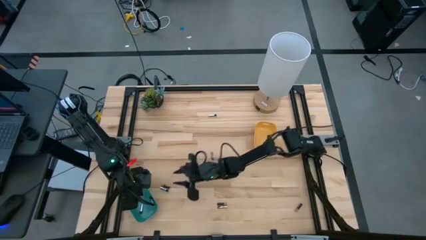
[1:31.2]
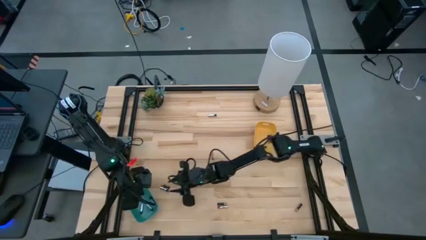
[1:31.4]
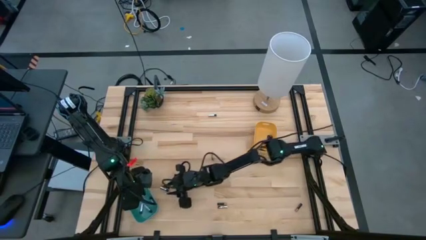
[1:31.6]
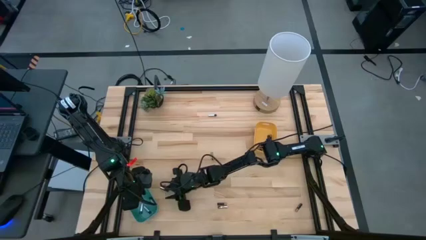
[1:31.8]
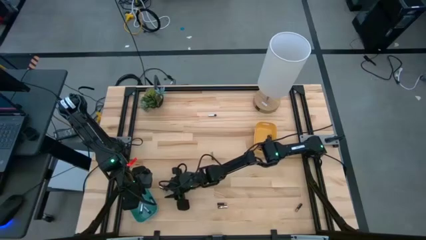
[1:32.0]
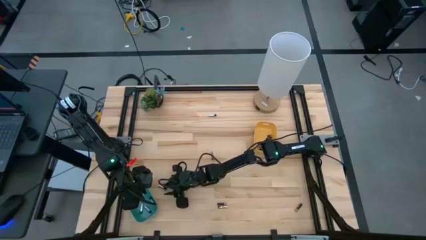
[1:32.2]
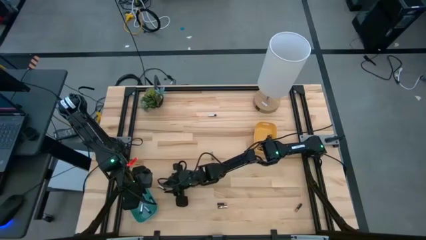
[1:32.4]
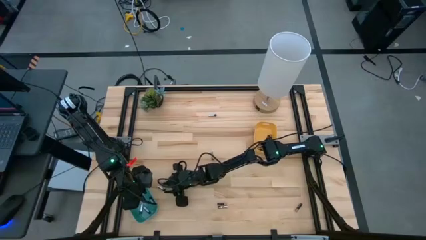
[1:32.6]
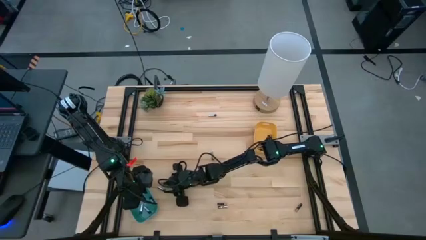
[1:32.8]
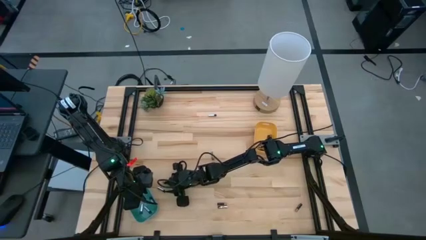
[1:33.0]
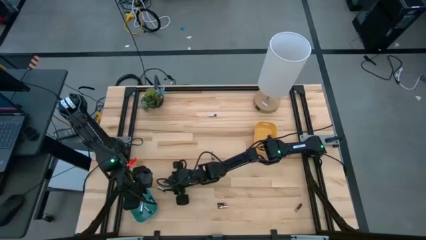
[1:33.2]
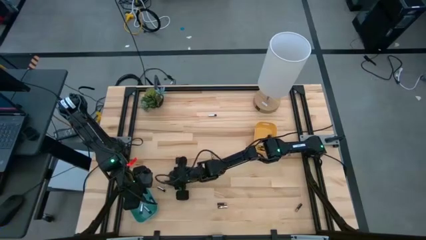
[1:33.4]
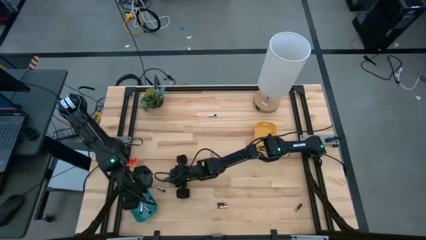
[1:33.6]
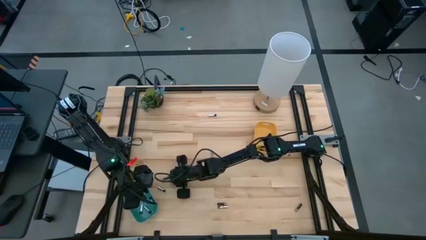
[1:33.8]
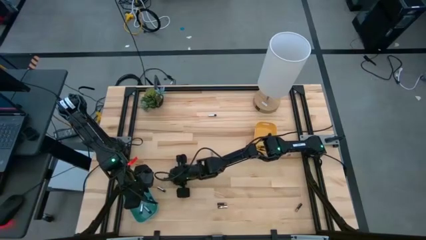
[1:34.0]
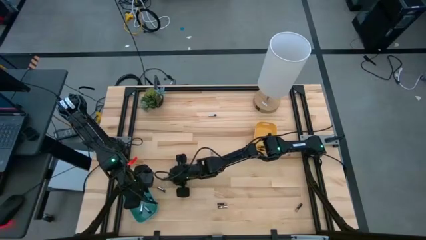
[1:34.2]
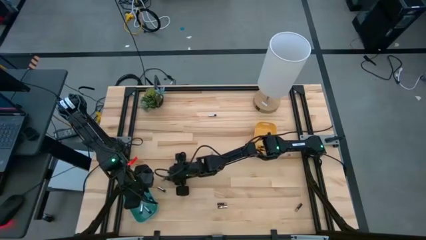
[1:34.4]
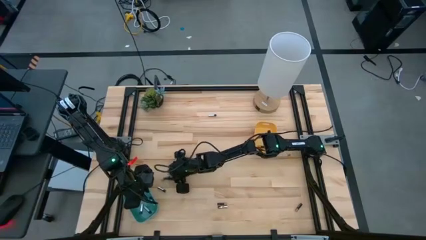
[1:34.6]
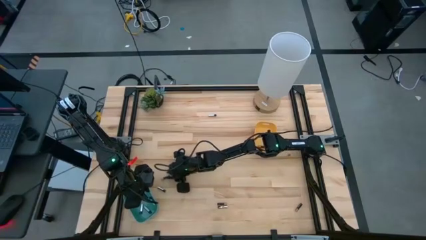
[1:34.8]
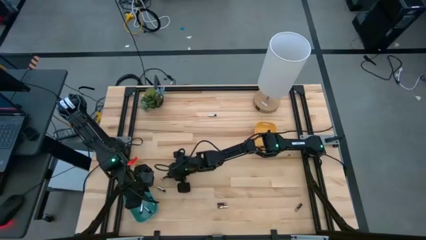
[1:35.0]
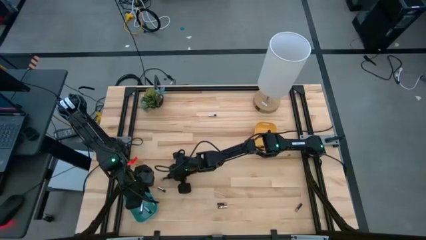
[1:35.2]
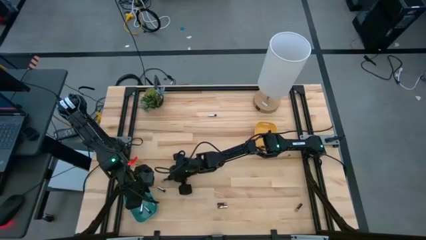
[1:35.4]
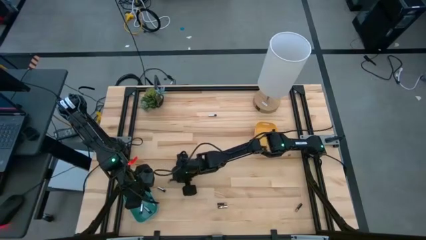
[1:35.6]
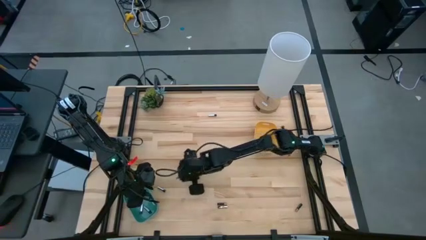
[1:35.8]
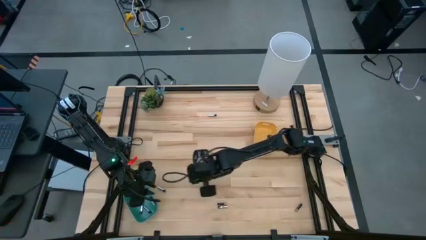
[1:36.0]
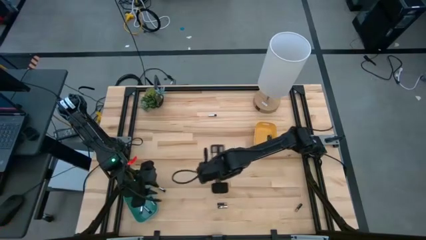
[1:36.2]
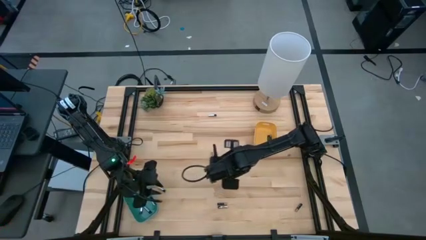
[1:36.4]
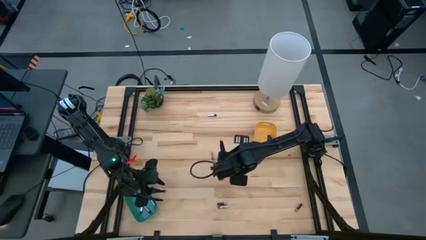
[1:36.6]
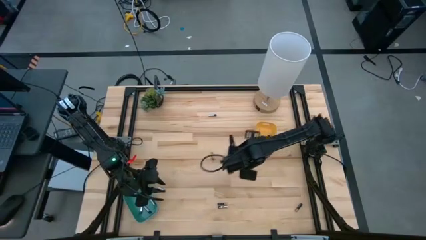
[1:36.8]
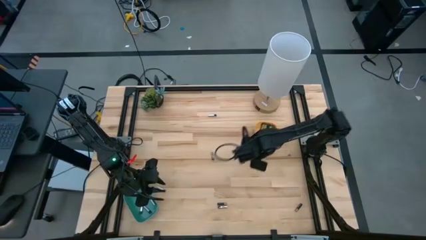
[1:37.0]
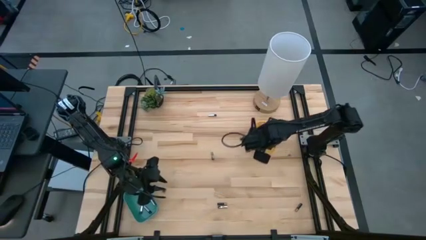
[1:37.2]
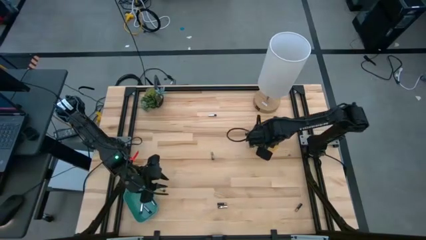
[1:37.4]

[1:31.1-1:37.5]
Task: Sort batteries
Put the black battery into the yellow bin

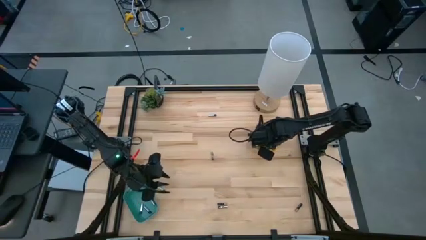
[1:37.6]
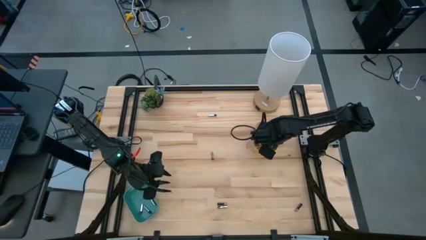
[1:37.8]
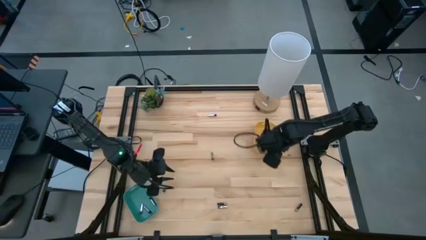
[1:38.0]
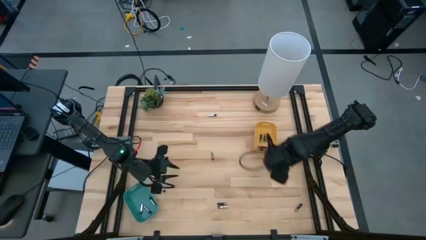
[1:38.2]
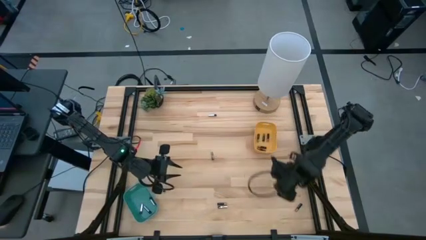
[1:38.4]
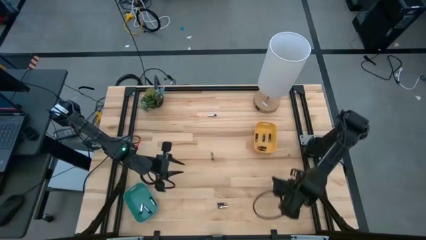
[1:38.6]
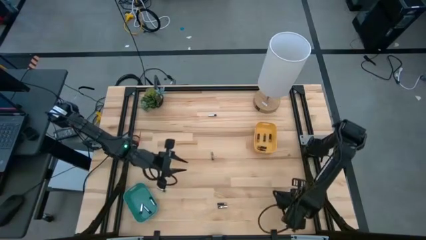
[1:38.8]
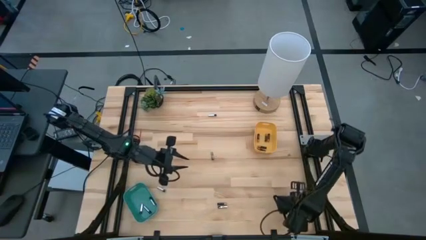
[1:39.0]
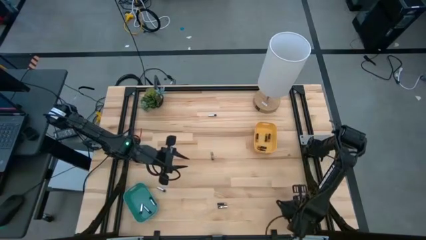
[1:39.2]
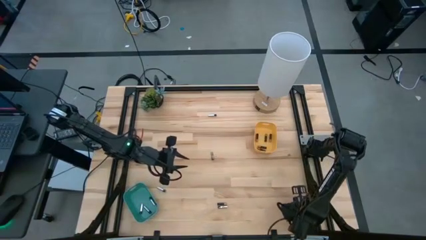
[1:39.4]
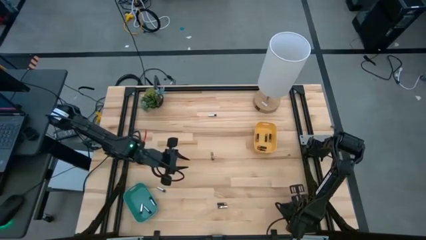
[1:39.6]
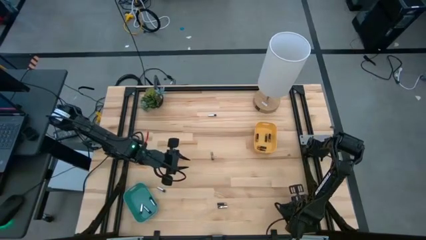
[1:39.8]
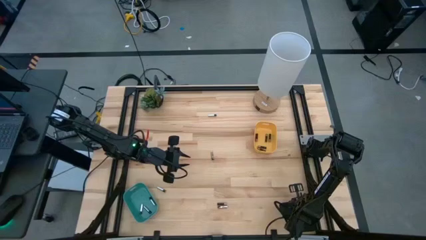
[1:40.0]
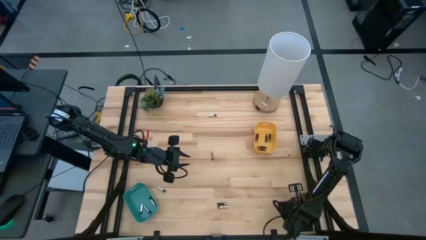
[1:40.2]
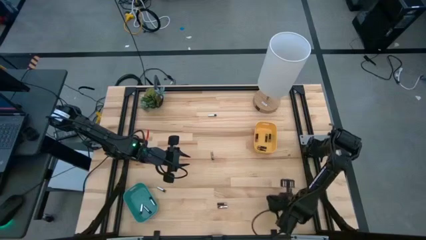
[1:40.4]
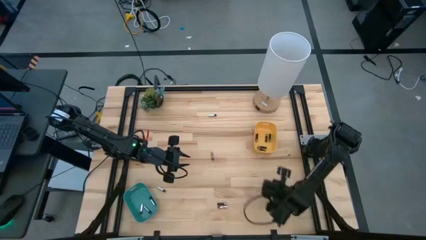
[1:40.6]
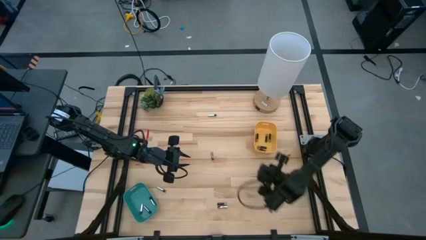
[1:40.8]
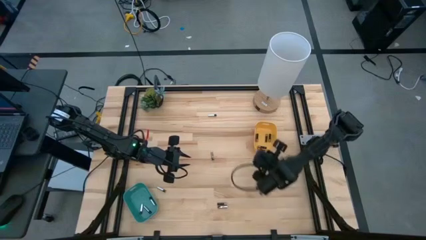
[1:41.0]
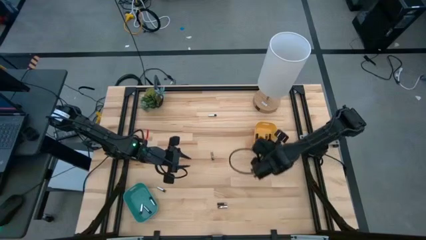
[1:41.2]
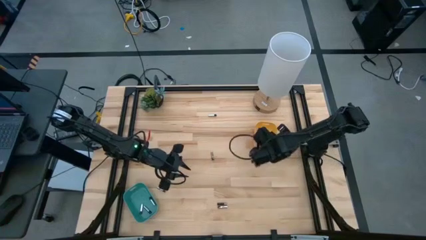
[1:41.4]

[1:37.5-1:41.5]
Put the black battery into the yellow bin

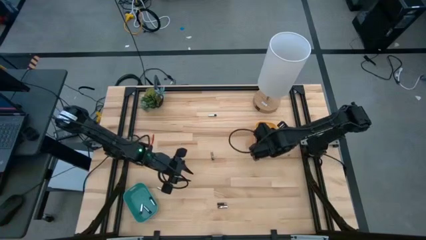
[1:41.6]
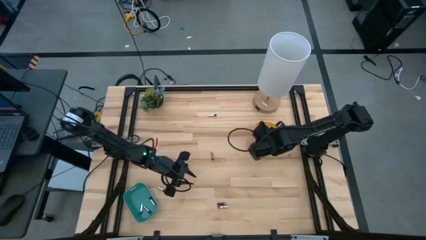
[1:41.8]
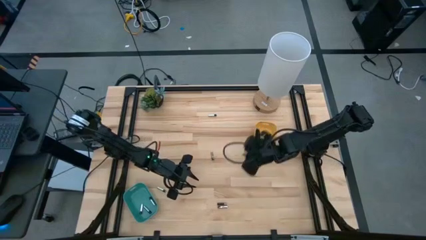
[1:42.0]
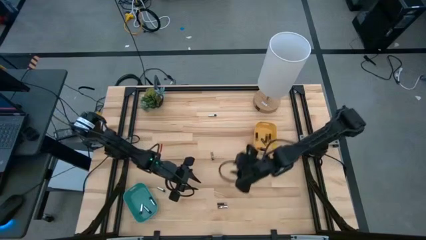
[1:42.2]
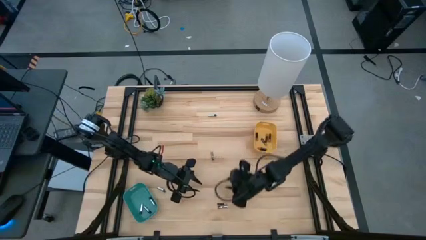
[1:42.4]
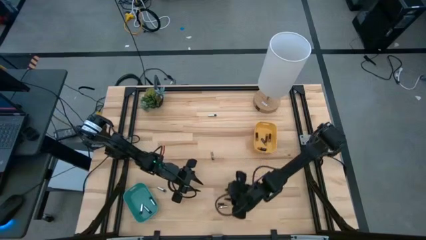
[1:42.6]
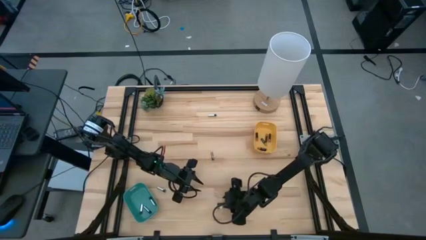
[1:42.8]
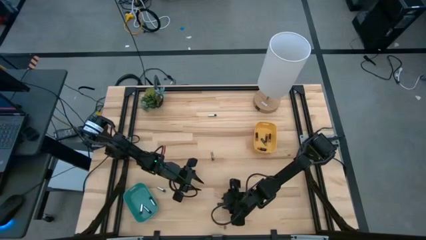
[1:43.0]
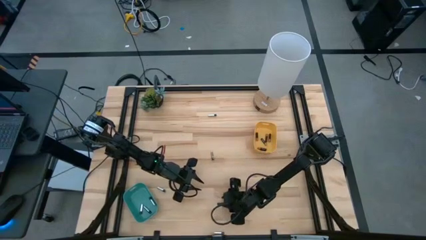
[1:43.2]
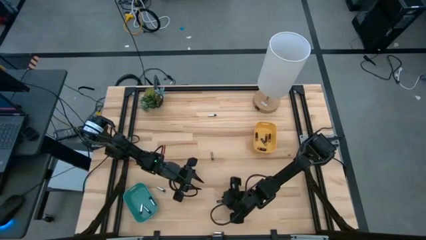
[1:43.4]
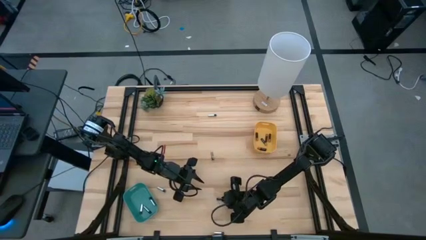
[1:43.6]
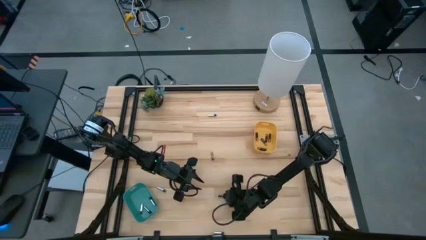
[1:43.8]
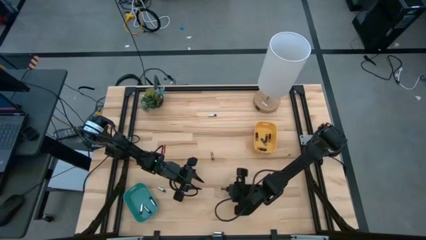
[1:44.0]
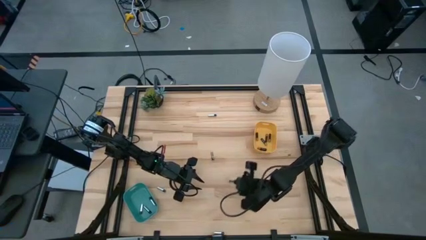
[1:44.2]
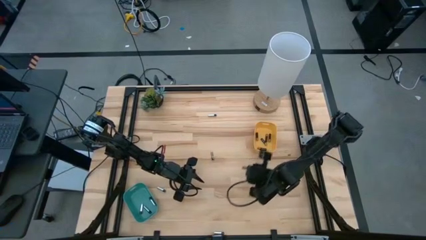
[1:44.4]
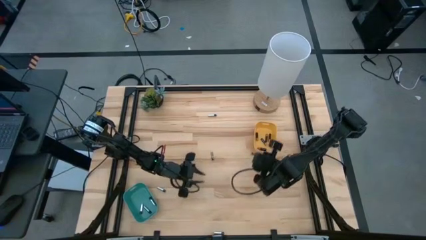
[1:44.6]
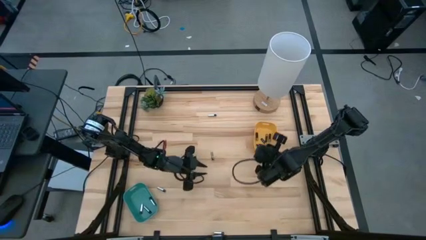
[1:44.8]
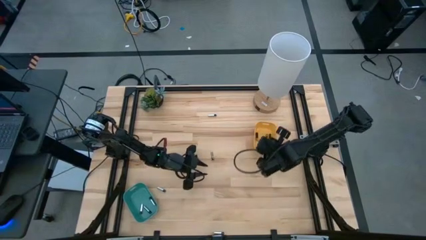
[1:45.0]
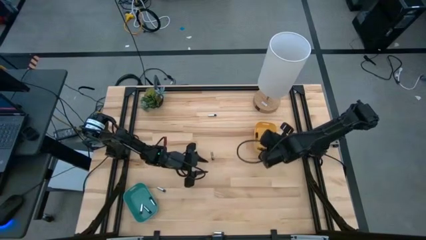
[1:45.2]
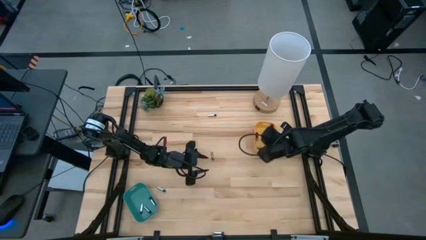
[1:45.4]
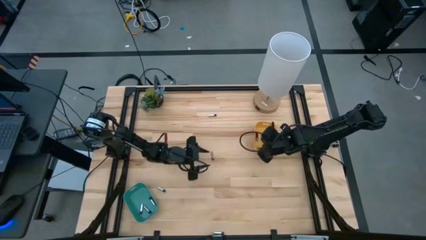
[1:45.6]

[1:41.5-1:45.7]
Put the black battery into the yellow bin

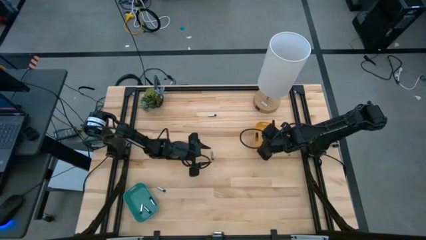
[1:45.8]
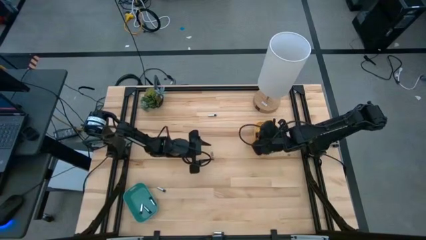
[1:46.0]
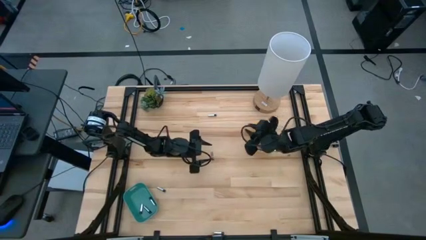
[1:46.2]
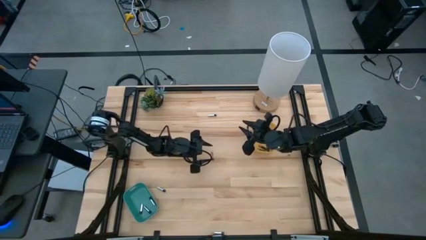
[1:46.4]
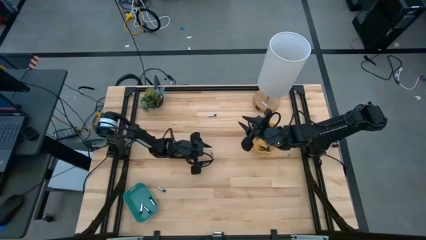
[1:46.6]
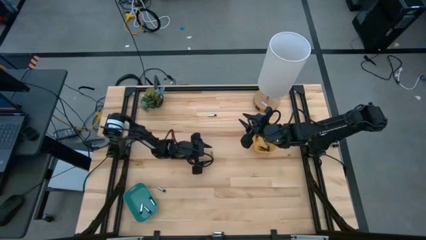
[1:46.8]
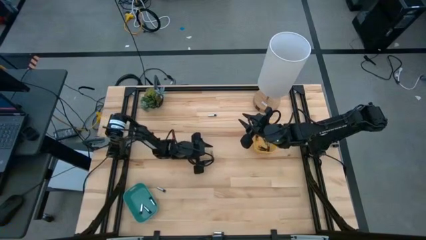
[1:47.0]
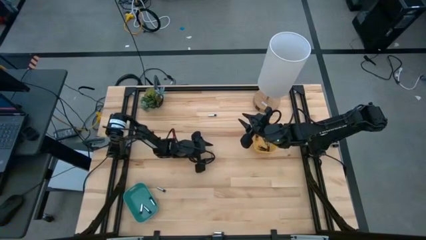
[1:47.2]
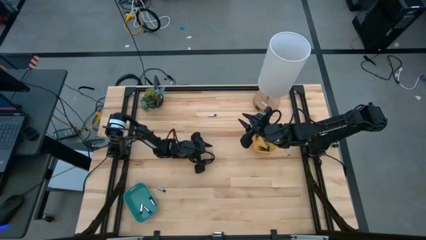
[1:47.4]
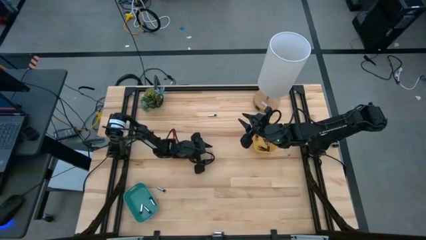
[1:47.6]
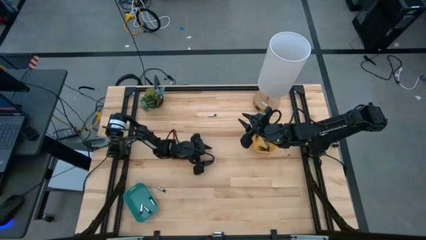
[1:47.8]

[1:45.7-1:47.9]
Put the silver battery into the blue bin
